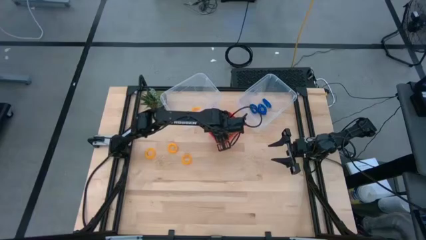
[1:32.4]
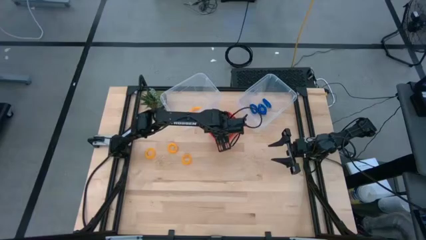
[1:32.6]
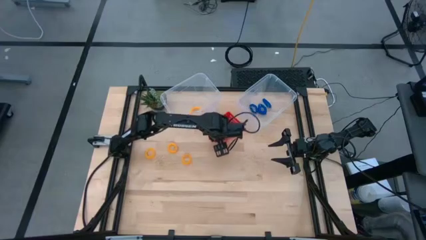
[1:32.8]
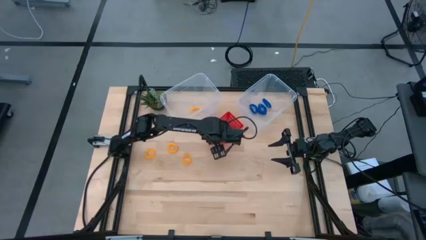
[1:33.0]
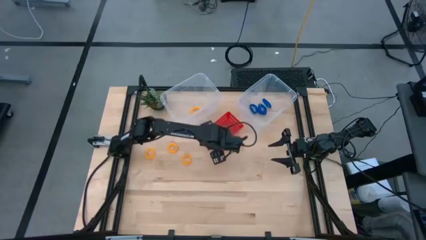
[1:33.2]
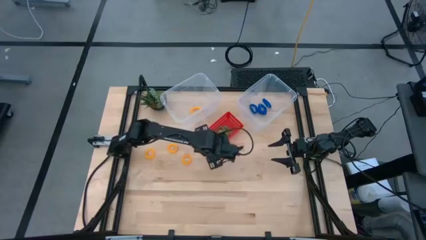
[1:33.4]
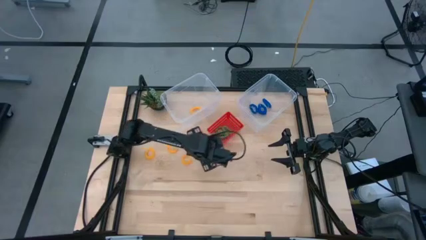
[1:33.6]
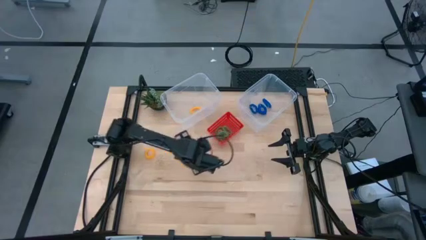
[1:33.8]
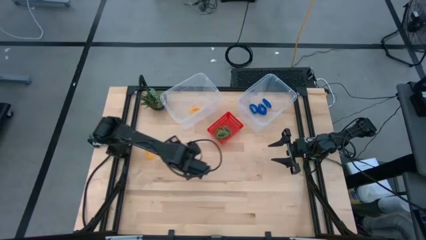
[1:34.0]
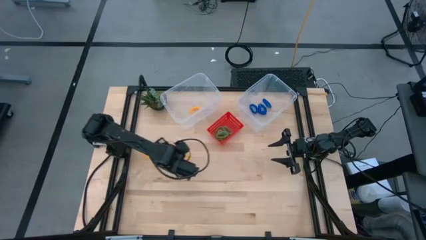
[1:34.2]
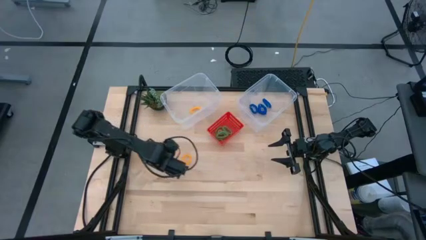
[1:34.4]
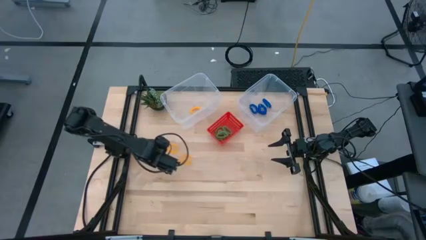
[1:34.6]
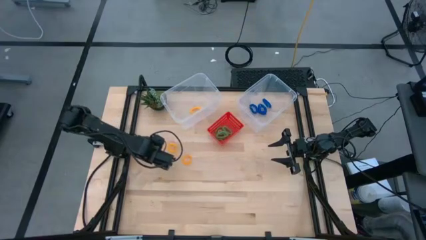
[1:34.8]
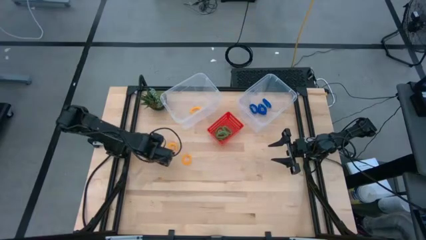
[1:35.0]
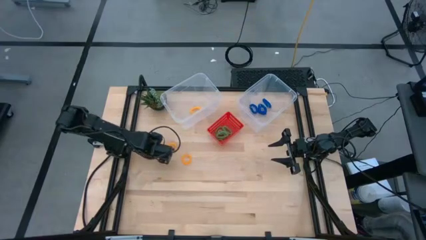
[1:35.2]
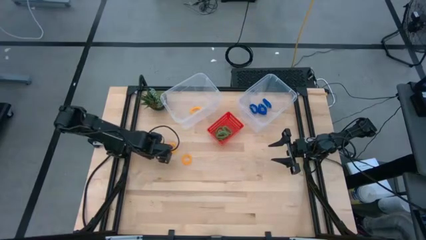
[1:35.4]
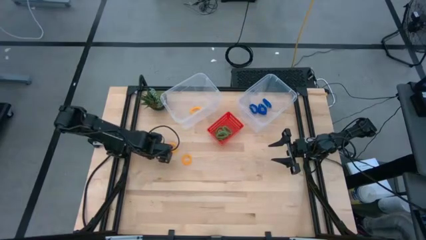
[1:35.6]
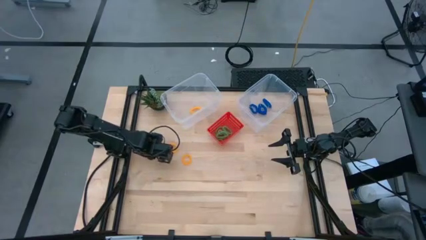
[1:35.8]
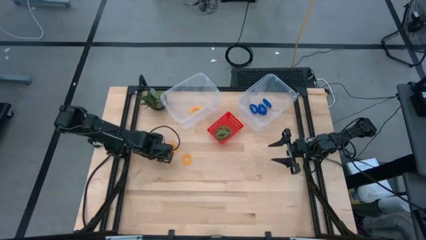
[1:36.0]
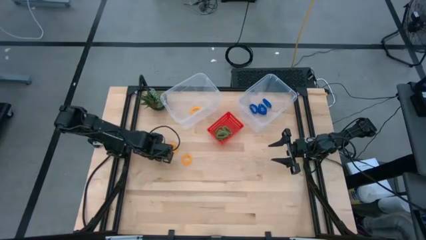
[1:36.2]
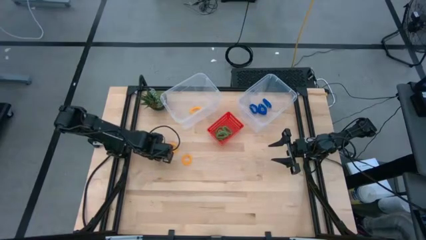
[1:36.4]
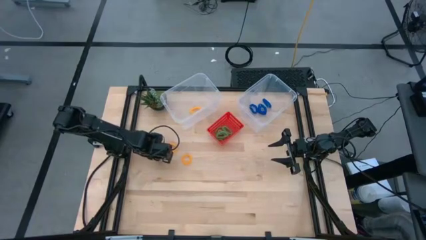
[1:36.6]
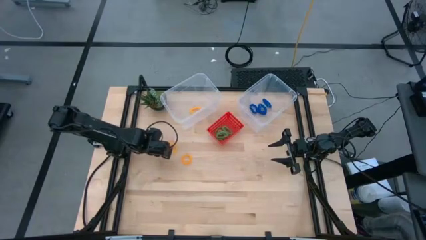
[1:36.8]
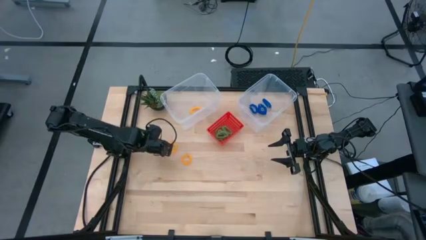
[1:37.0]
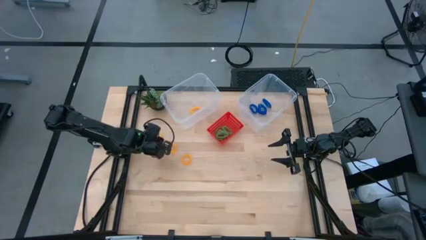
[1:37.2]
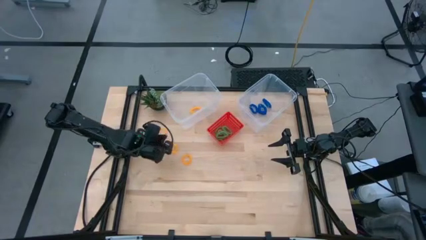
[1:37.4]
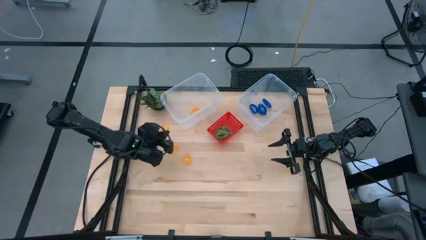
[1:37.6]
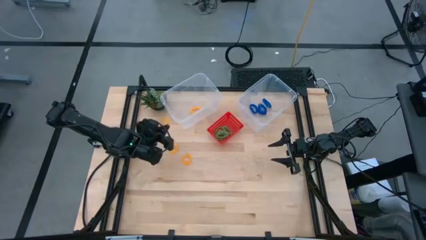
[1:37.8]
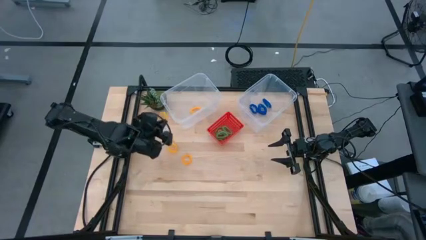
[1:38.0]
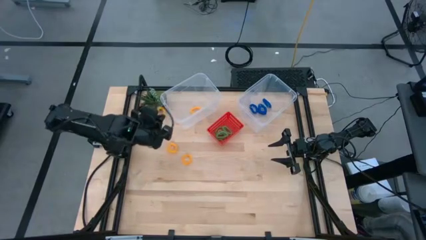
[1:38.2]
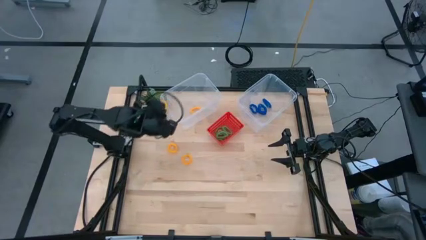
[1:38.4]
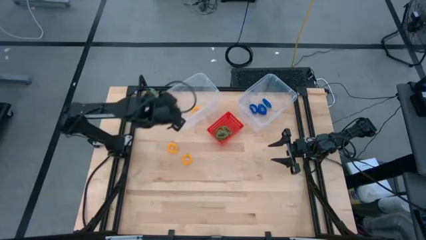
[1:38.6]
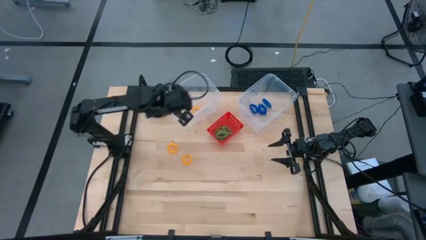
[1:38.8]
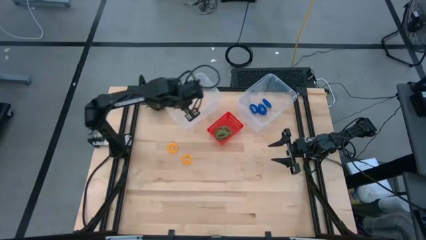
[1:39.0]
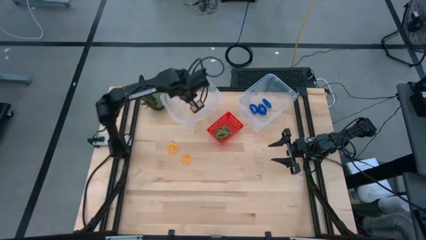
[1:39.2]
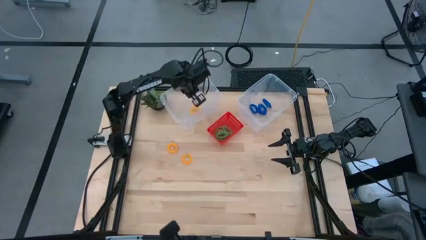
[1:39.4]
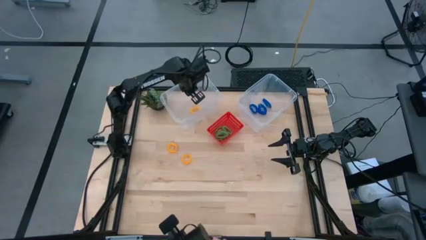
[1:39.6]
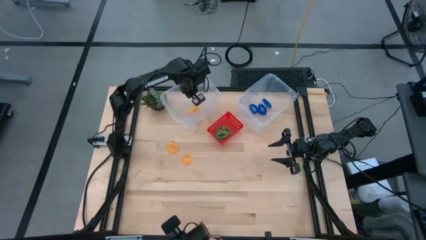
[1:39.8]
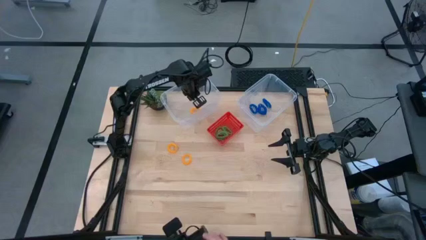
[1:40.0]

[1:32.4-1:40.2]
Task: Sort spring keychains
Put the yellow spring keychain into the left transparent bin

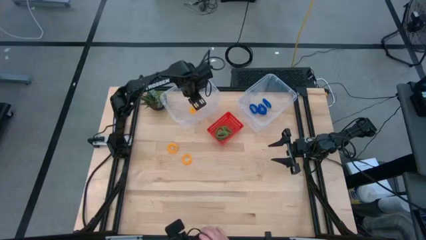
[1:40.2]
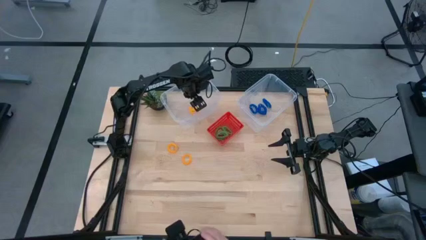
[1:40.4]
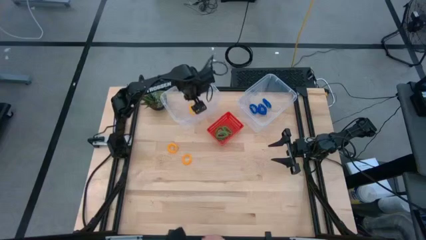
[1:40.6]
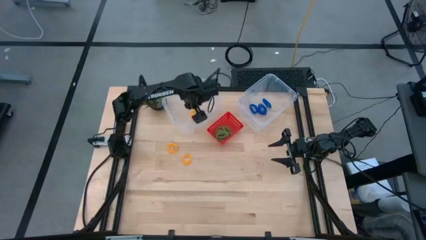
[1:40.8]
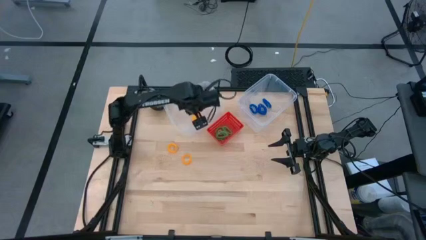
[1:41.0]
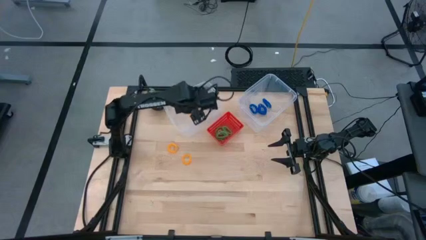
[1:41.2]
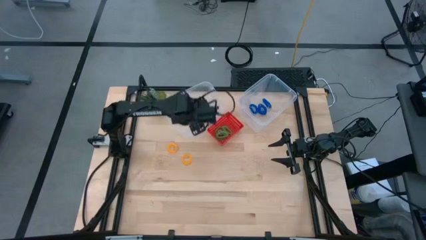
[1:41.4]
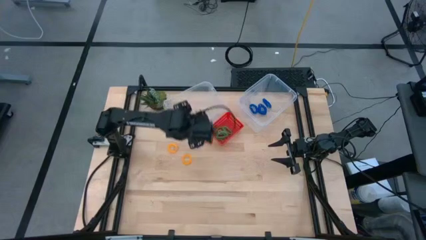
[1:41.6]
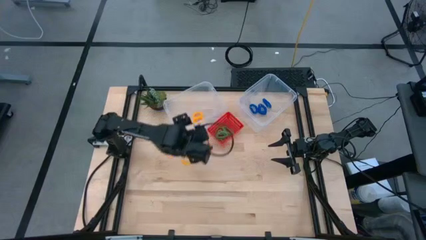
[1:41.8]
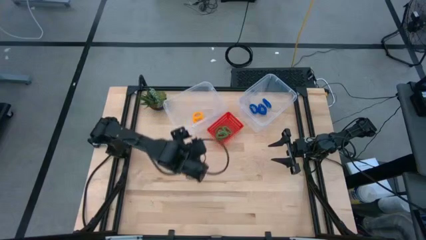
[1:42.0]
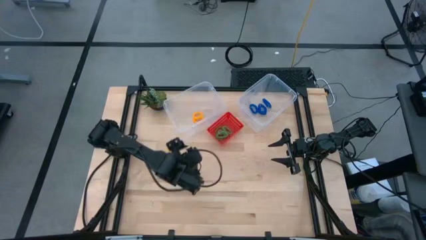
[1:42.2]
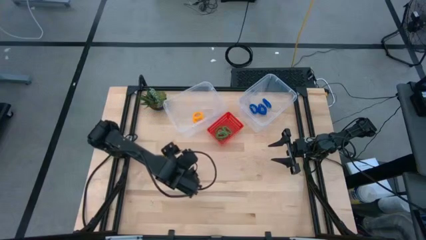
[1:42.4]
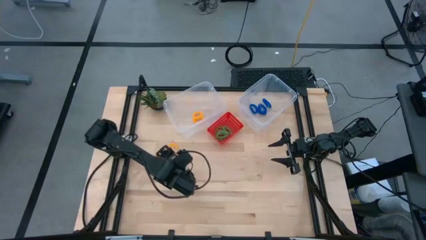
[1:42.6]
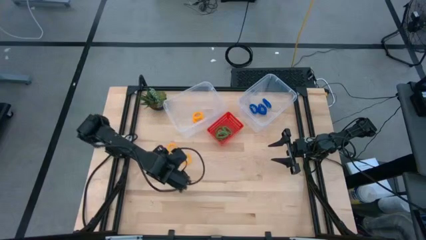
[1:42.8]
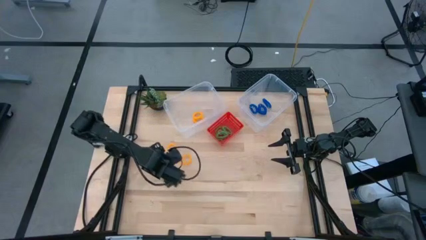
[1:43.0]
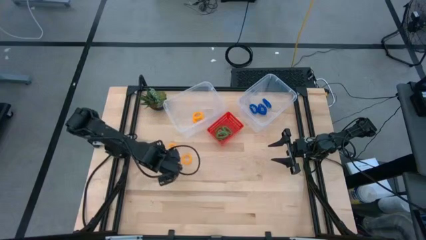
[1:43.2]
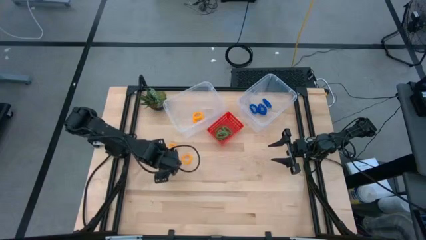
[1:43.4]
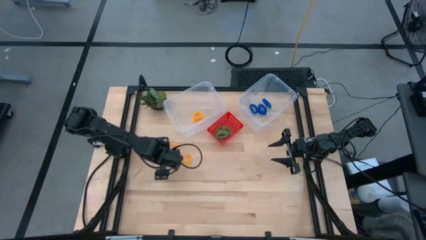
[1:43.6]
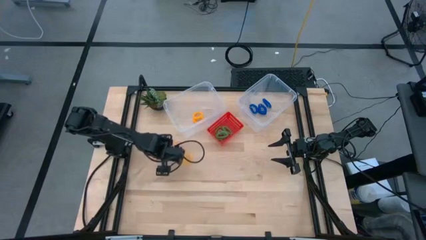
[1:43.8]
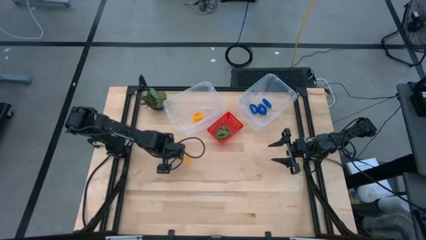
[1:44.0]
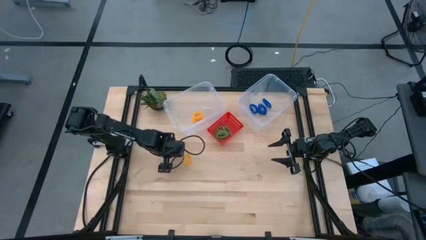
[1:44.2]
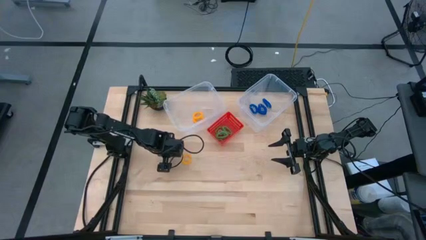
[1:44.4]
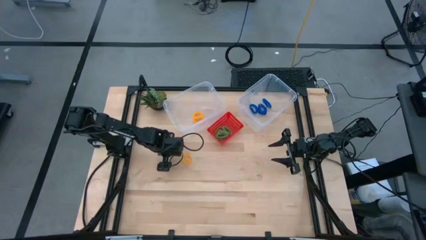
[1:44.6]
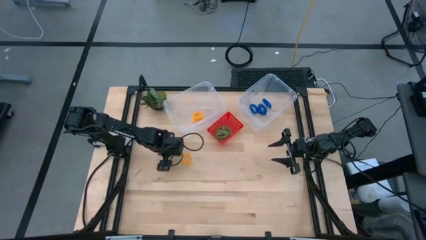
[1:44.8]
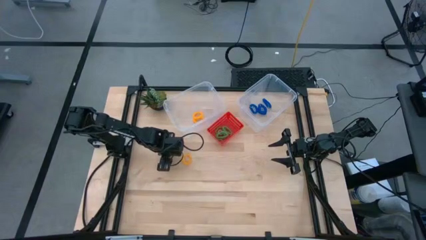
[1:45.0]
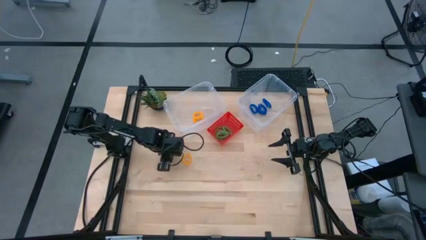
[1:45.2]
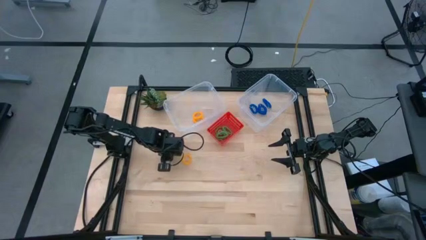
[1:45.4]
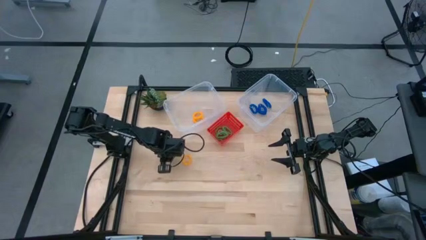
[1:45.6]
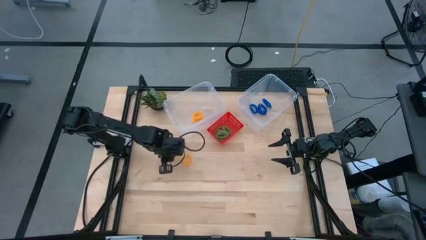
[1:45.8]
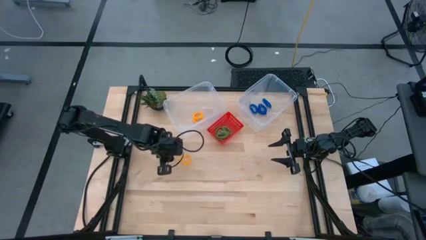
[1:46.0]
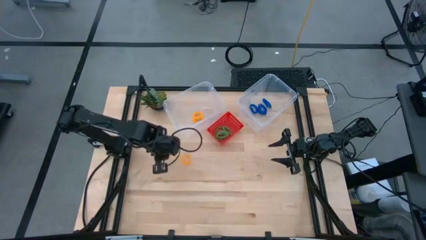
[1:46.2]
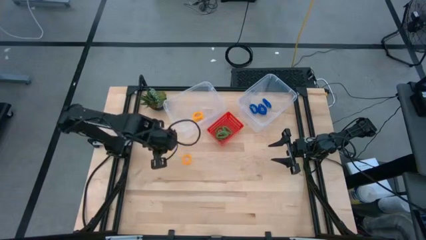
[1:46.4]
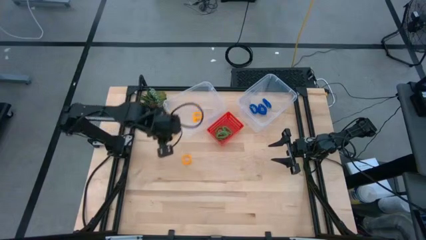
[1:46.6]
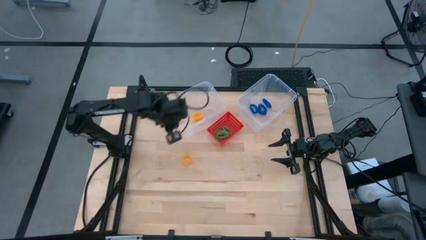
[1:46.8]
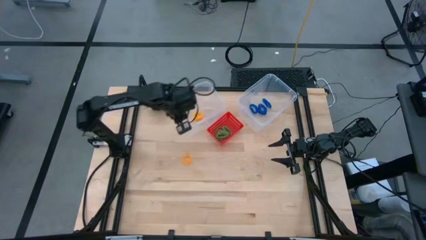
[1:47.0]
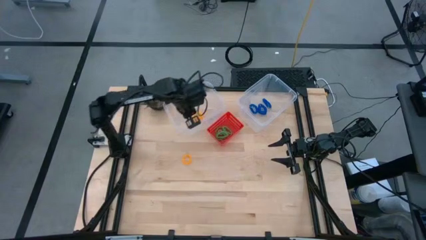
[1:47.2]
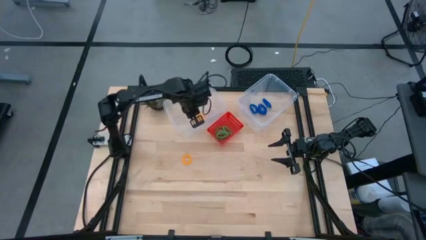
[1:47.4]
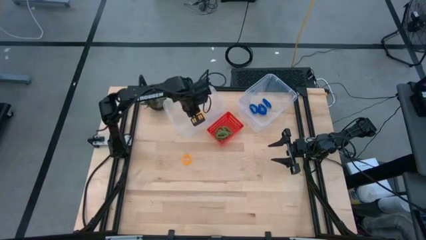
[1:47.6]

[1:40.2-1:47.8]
Put the yellow spring keychain into the left transparent bin

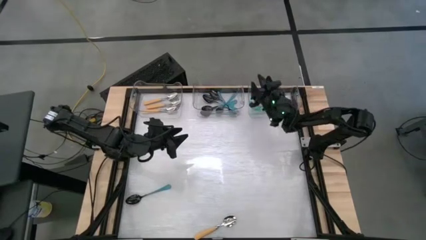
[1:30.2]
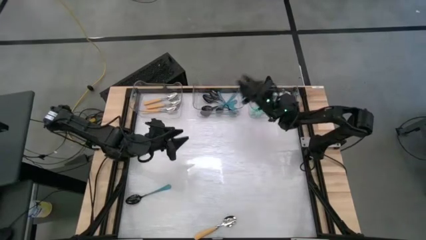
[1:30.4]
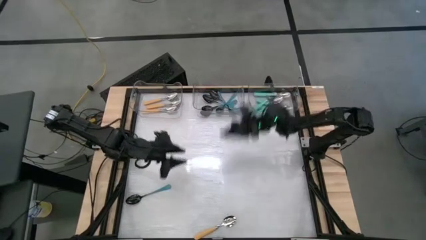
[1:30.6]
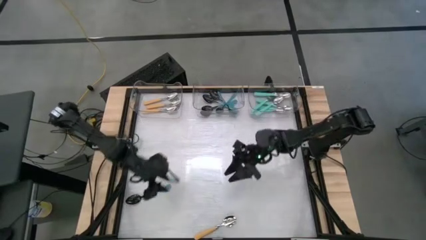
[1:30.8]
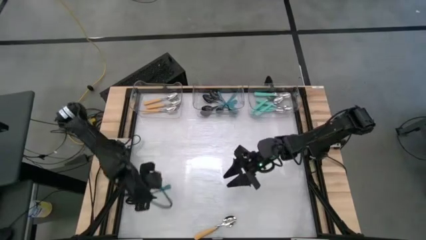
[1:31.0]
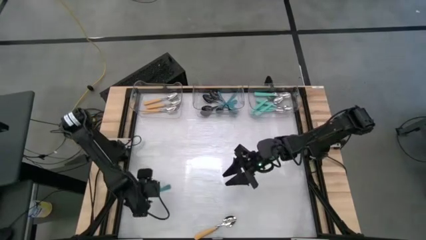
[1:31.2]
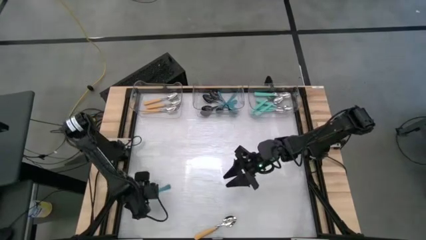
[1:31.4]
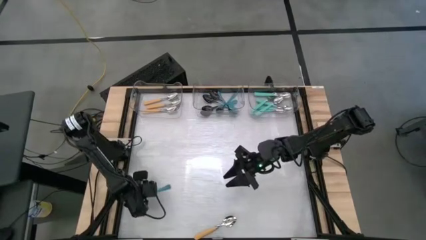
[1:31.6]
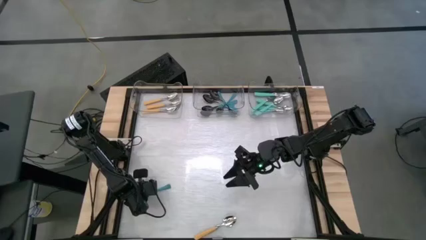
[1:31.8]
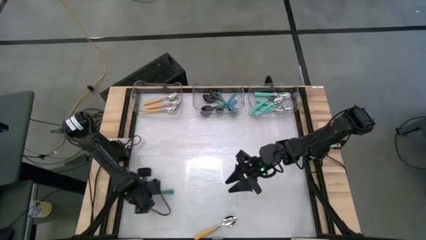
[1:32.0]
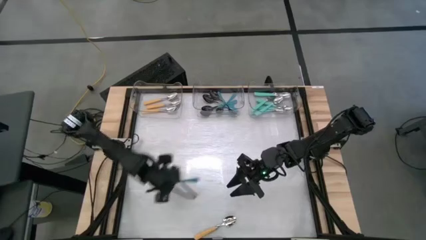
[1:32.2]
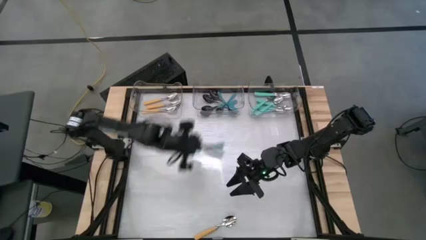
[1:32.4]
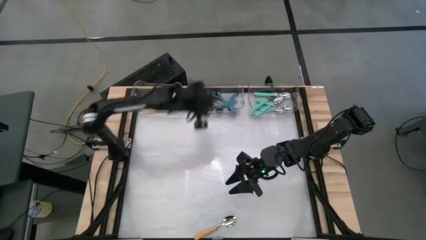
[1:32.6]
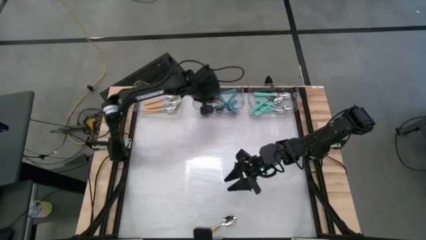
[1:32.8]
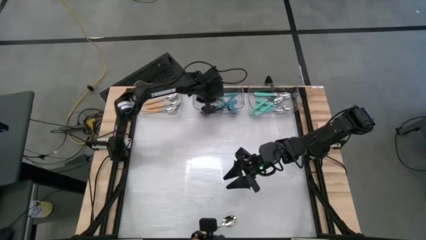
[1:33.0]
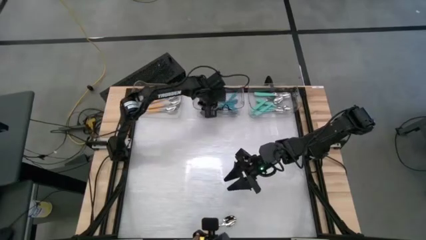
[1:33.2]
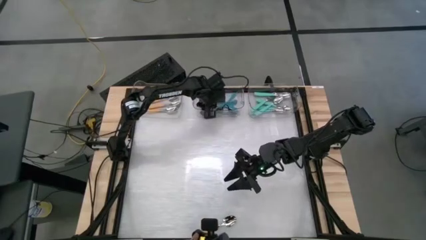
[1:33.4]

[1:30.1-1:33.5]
Task: Sort silverware by color (type)
Put the blue spoon into the middle transparent bin
